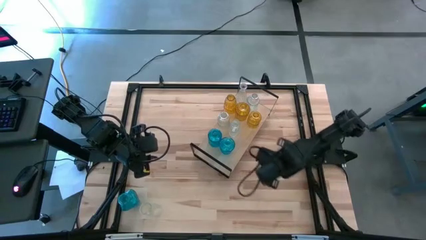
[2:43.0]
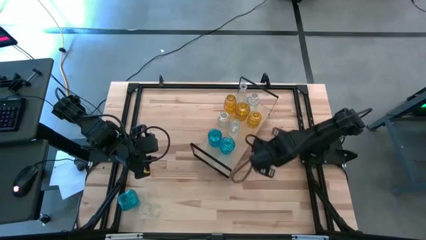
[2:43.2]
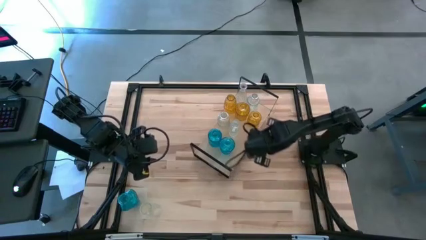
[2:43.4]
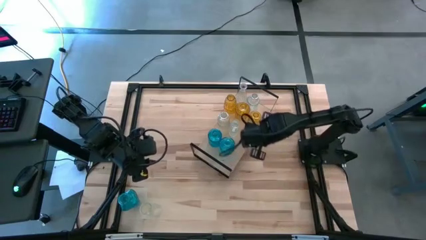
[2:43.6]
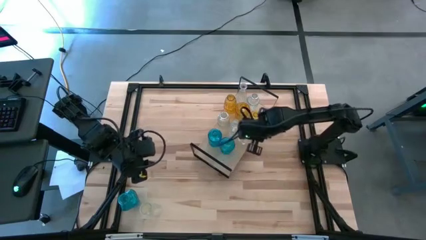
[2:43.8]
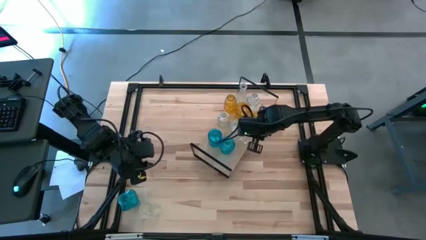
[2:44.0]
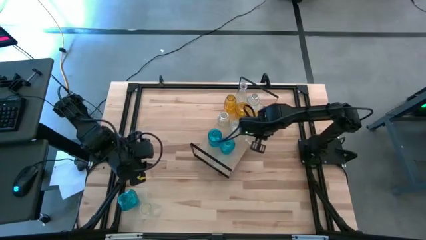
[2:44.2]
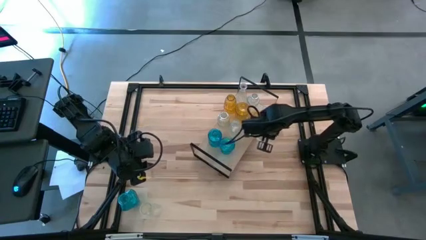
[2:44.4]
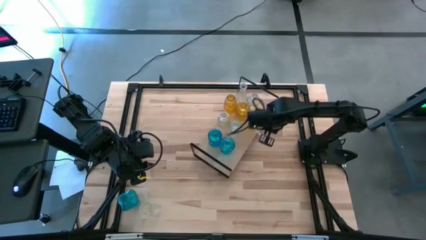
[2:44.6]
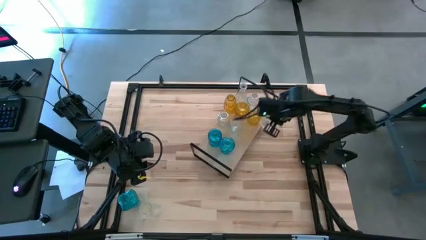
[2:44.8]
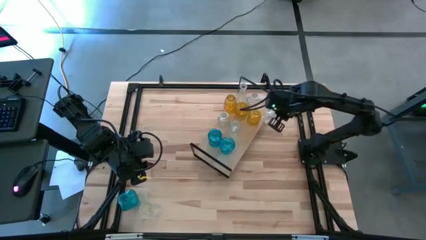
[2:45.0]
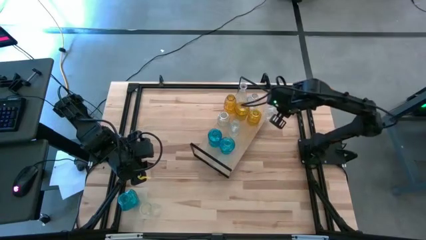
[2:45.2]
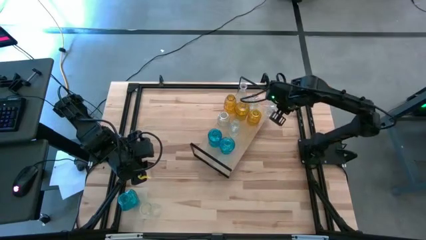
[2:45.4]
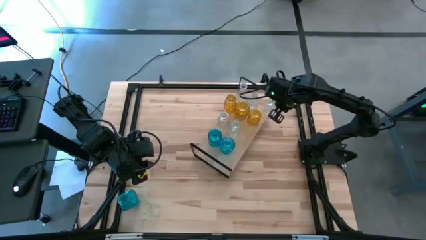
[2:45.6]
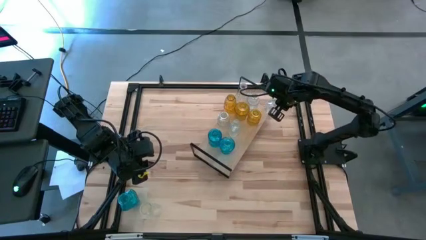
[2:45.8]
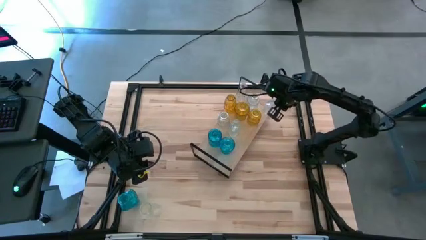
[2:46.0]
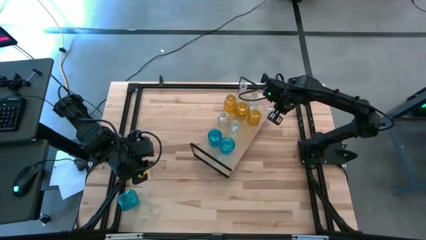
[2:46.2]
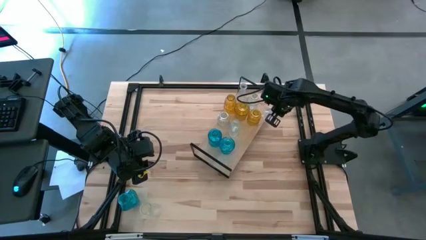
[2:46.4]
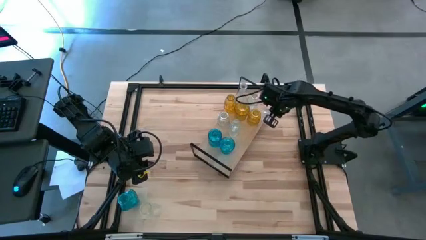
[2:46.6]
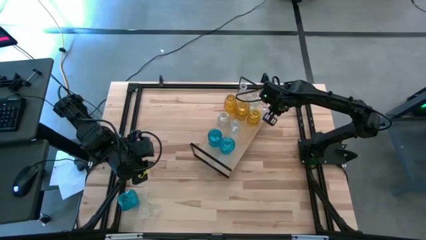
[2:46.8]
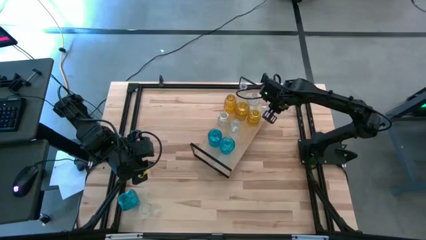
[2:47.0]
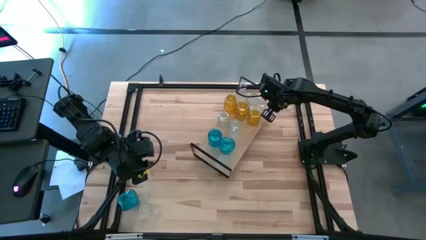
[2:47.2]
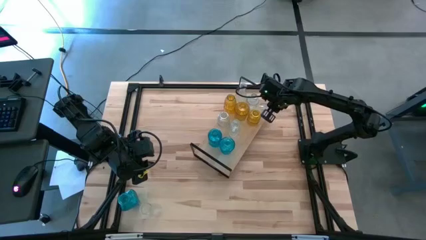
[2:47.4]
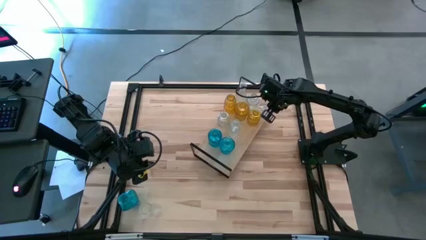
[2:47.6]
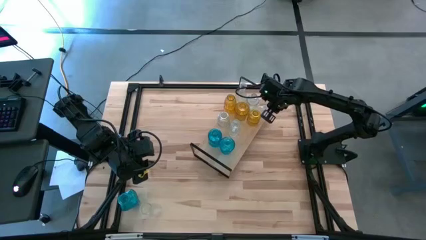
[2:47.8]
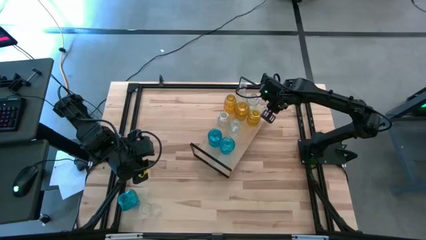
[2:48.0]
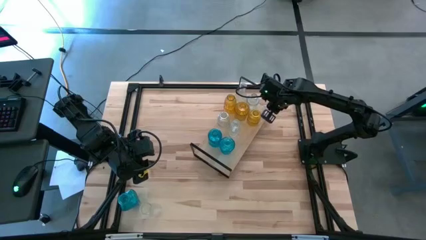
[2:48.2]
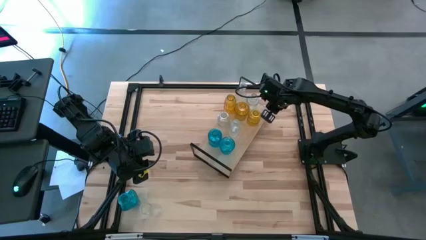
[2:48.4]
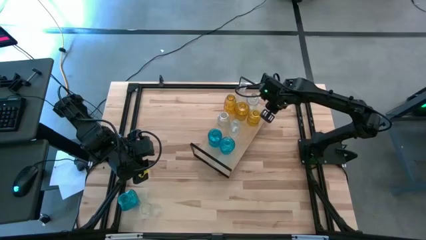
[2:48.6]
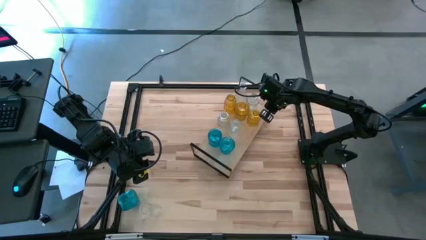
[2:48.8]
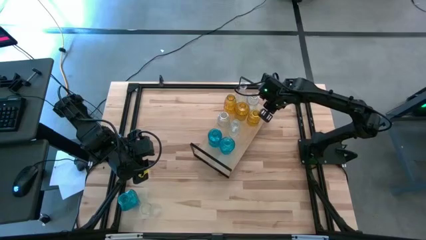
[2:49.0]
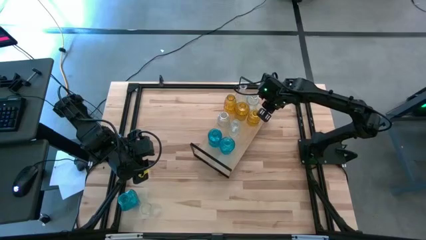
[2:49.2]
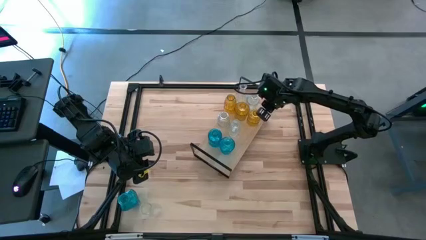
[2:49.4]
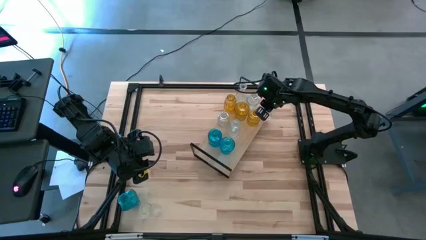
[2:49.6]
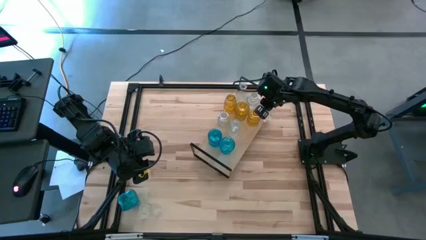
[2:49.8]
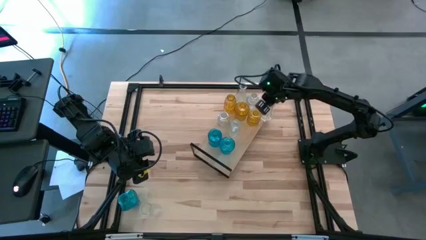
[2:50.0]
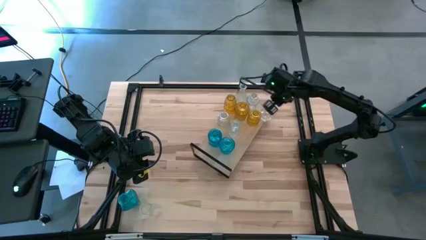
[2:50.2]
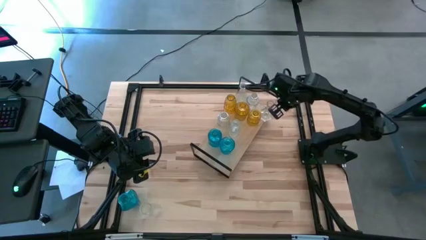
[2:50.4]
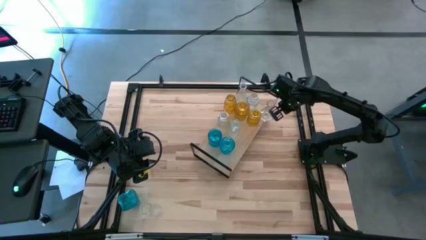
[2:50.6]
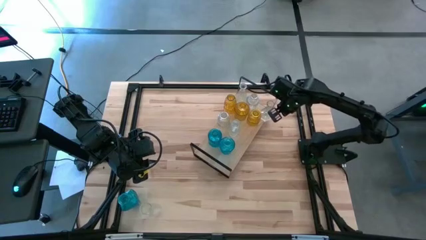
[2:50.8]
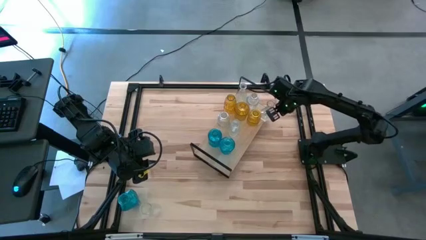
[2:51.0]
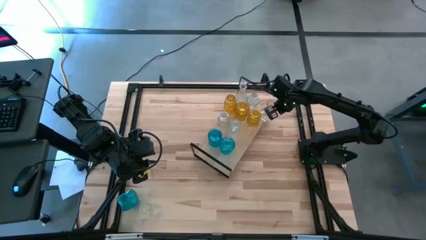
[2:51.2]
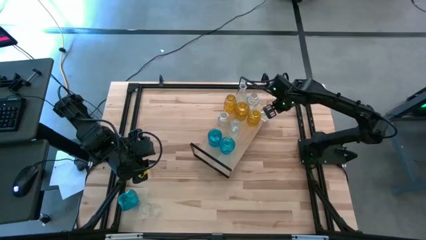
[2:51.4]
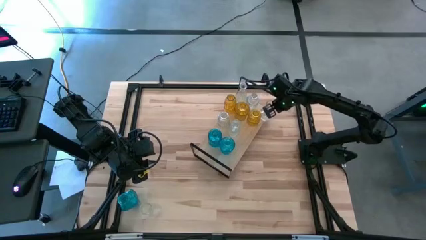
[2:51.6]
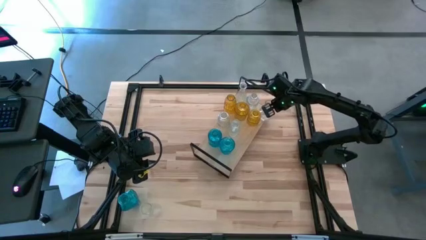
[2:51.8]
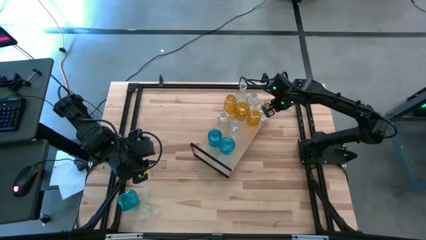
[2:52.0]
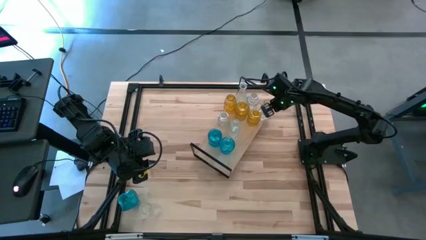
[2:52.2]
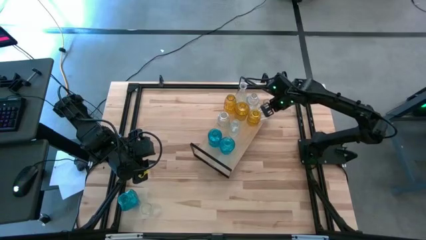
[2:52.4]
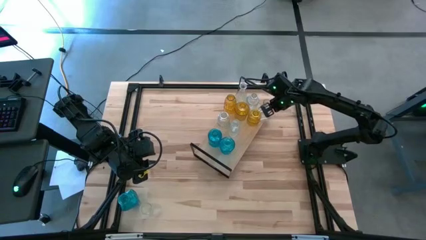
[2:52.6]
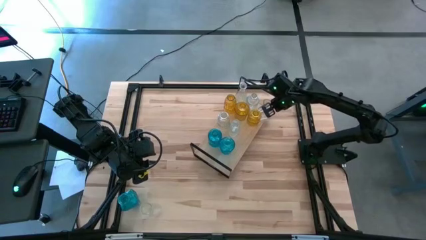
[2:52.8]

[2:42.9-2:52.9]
Task: sort vases onto shelf
Put the right transparent vase on the shelf and align with the other transparent vase
